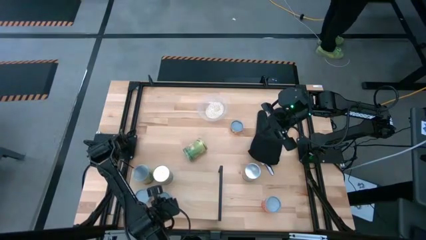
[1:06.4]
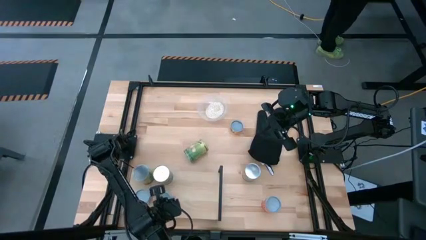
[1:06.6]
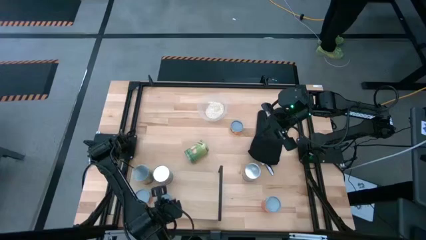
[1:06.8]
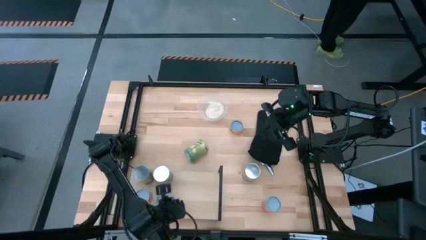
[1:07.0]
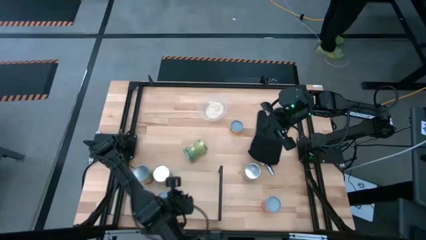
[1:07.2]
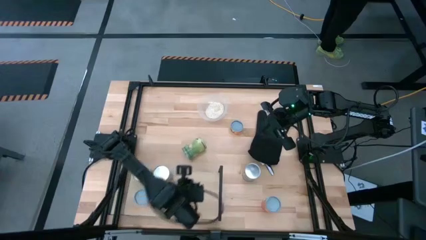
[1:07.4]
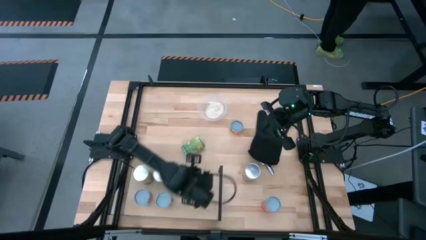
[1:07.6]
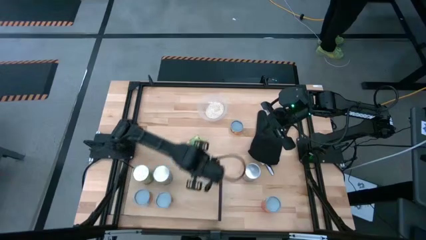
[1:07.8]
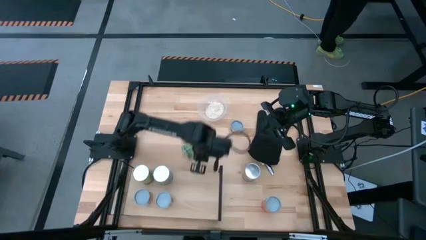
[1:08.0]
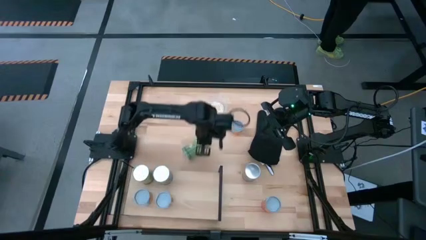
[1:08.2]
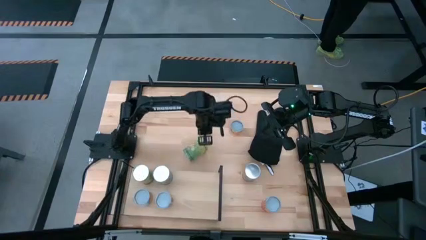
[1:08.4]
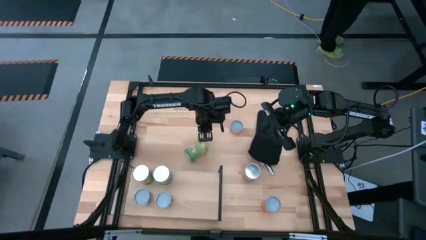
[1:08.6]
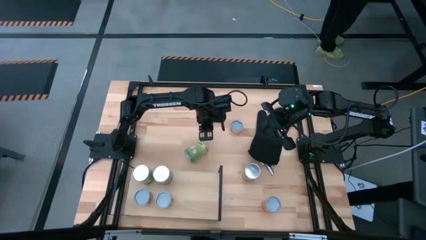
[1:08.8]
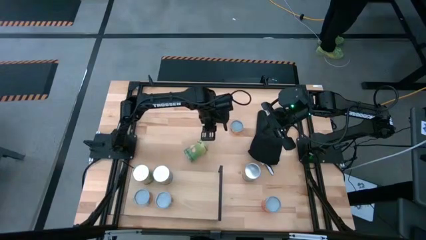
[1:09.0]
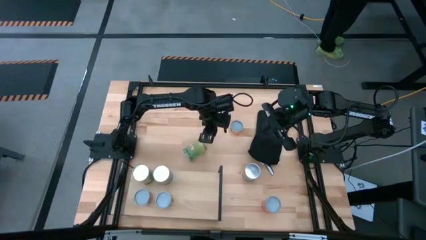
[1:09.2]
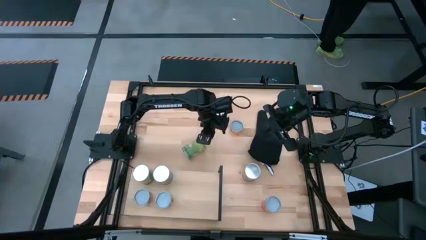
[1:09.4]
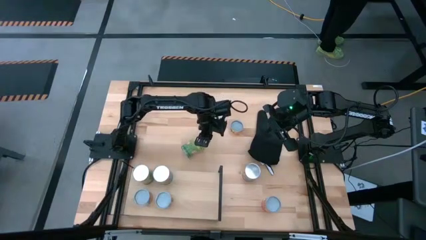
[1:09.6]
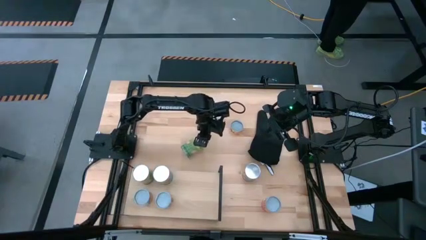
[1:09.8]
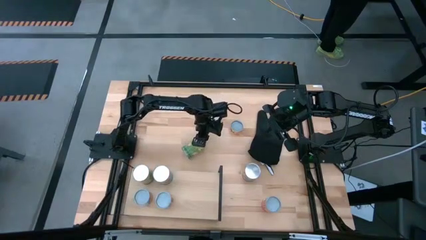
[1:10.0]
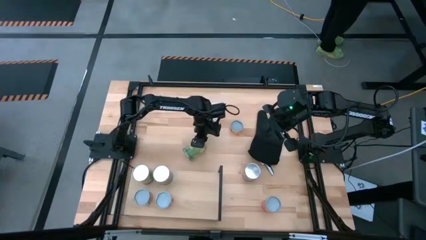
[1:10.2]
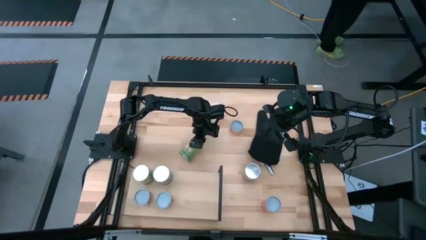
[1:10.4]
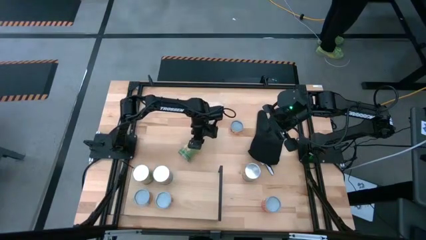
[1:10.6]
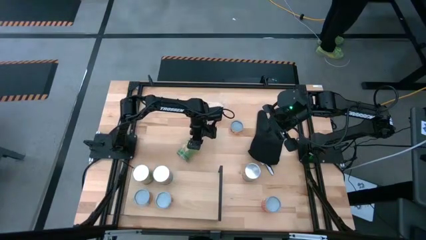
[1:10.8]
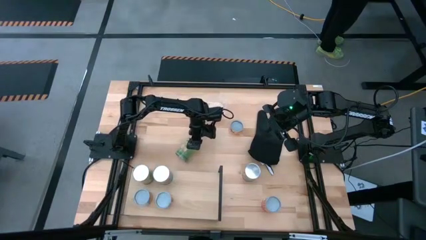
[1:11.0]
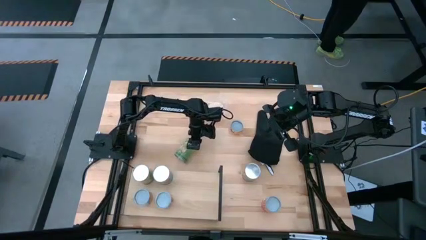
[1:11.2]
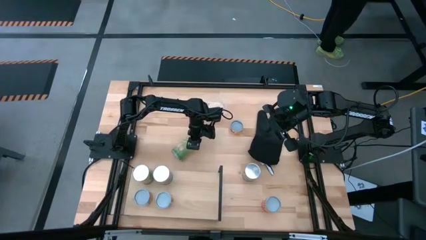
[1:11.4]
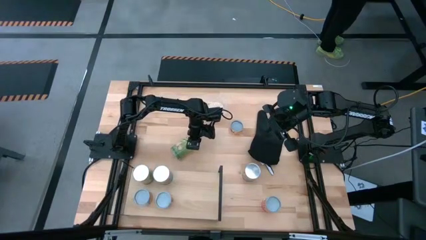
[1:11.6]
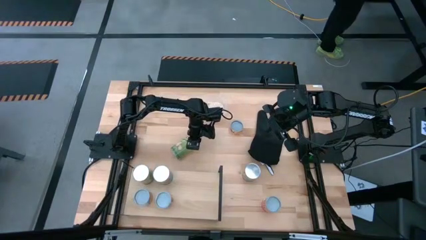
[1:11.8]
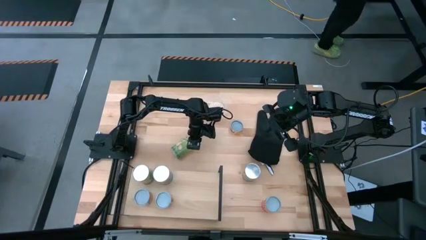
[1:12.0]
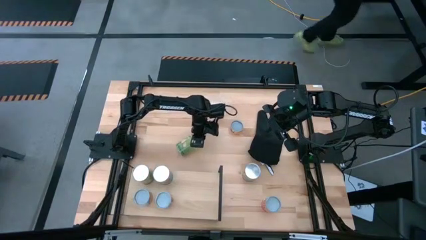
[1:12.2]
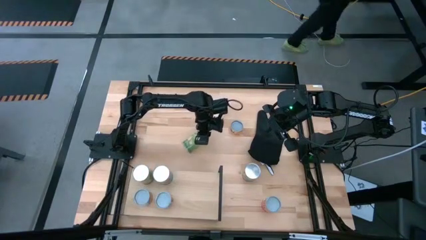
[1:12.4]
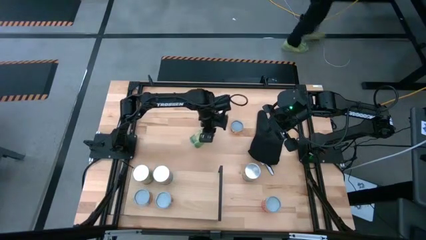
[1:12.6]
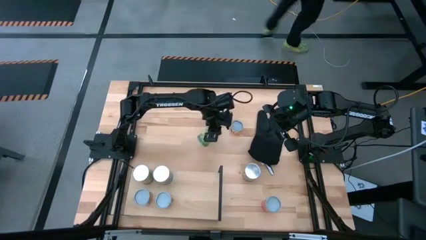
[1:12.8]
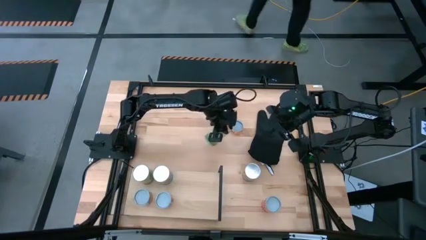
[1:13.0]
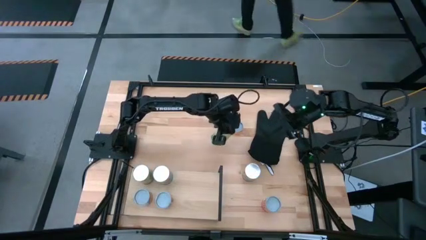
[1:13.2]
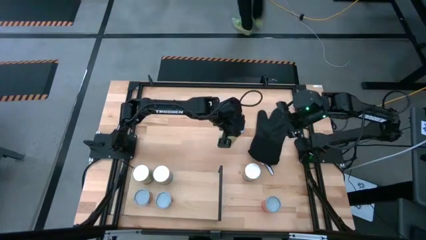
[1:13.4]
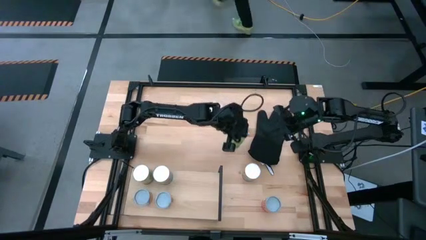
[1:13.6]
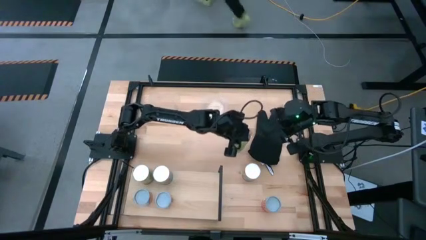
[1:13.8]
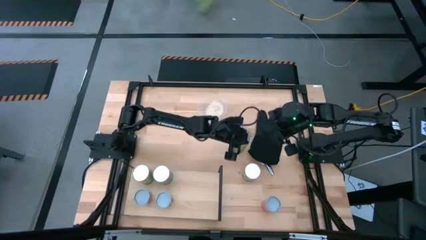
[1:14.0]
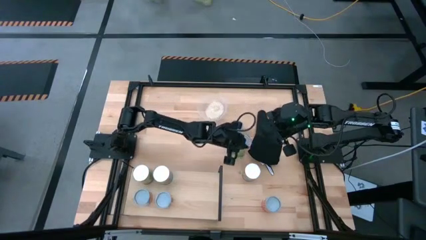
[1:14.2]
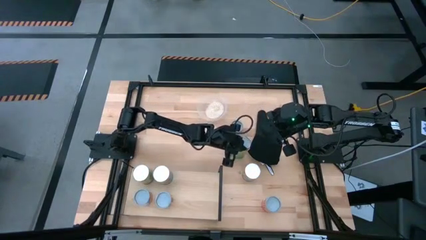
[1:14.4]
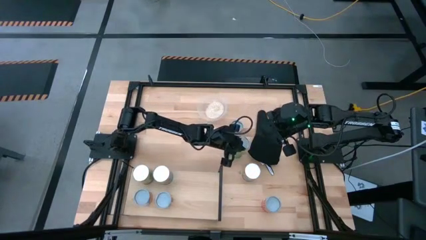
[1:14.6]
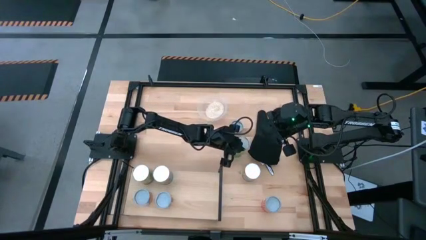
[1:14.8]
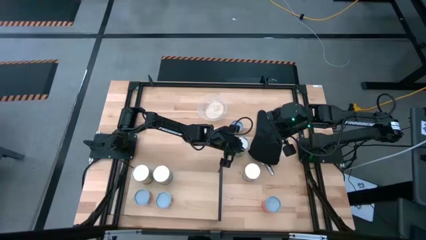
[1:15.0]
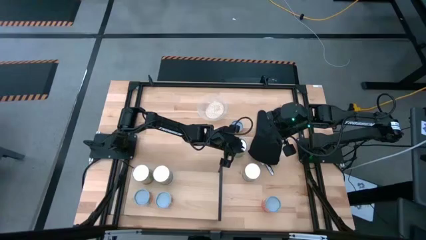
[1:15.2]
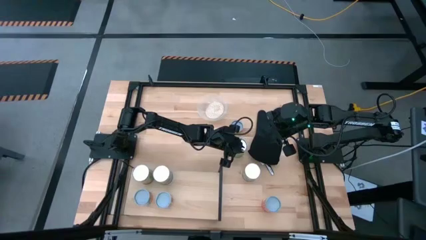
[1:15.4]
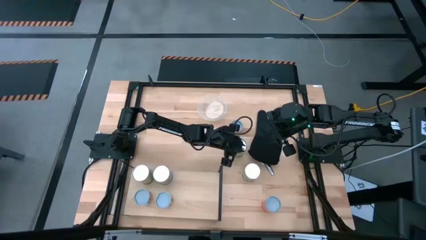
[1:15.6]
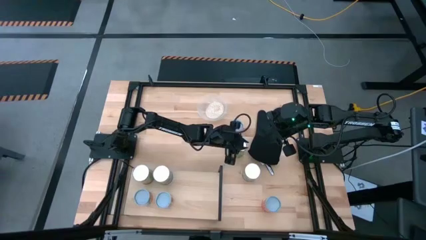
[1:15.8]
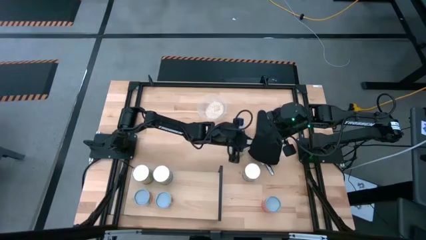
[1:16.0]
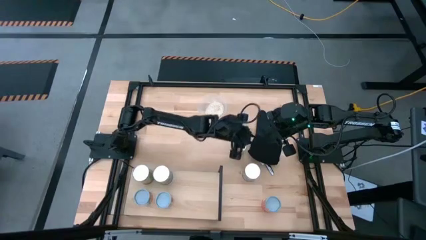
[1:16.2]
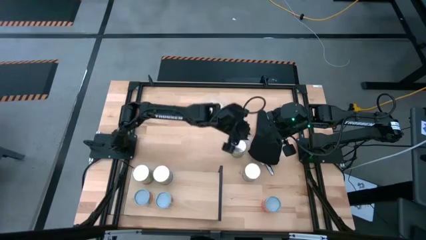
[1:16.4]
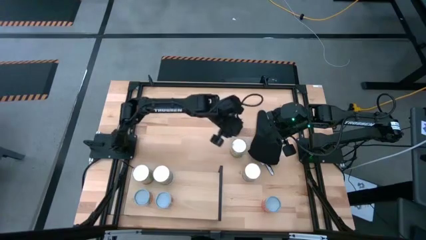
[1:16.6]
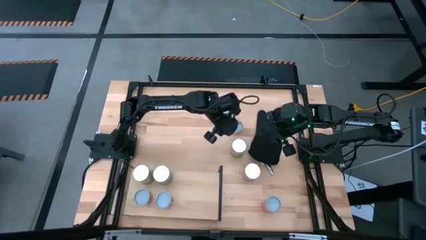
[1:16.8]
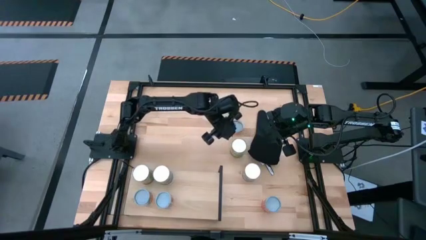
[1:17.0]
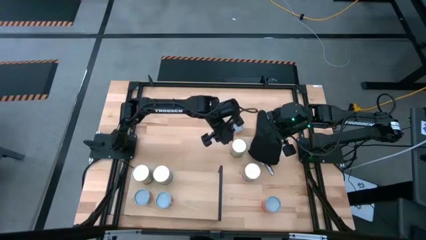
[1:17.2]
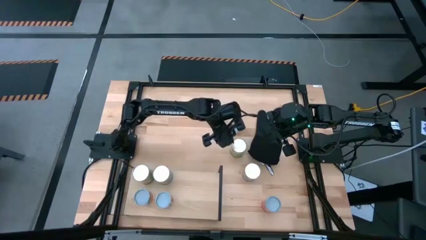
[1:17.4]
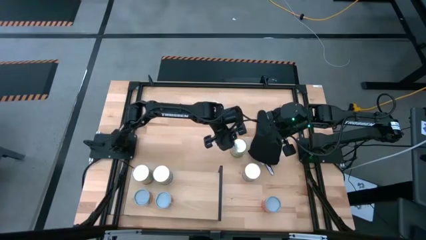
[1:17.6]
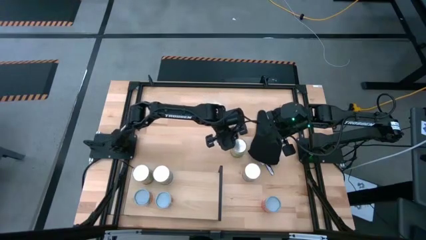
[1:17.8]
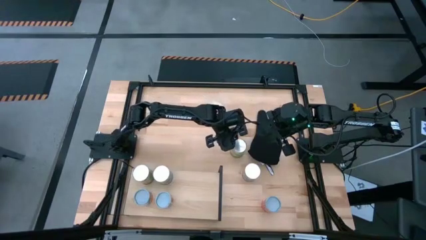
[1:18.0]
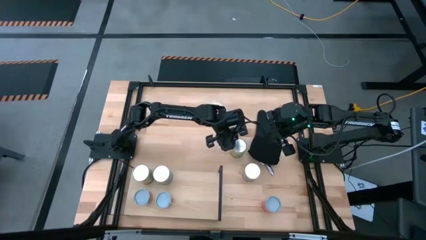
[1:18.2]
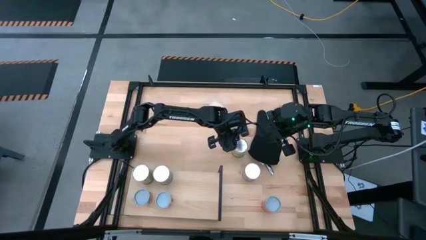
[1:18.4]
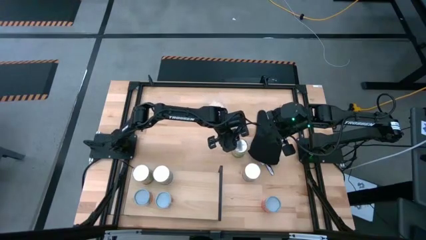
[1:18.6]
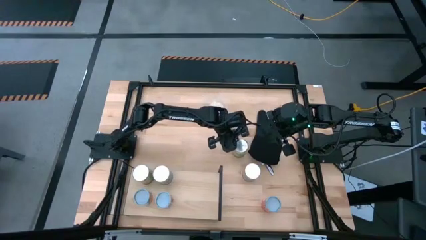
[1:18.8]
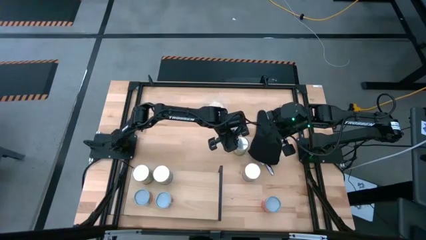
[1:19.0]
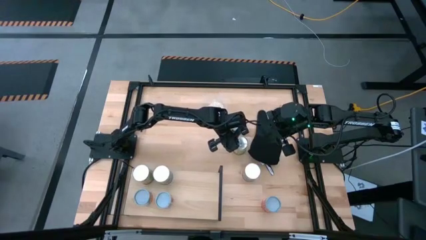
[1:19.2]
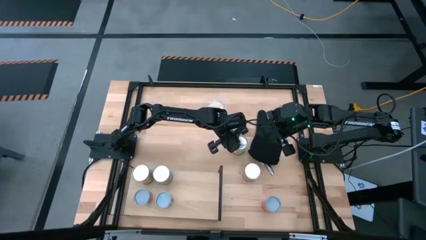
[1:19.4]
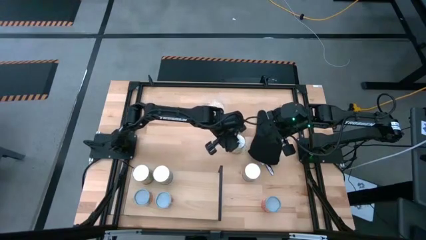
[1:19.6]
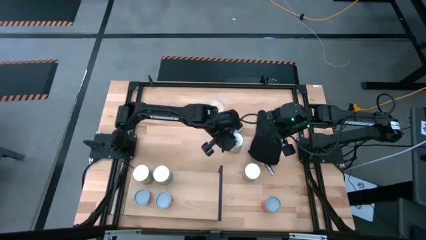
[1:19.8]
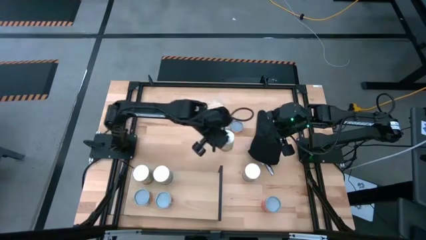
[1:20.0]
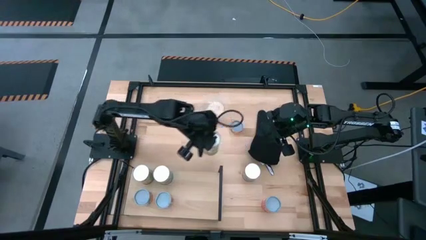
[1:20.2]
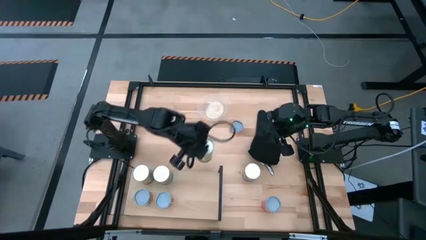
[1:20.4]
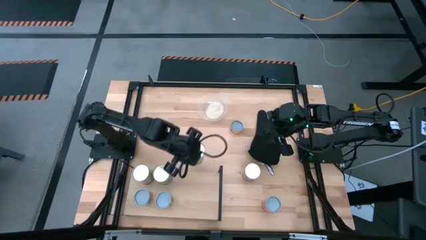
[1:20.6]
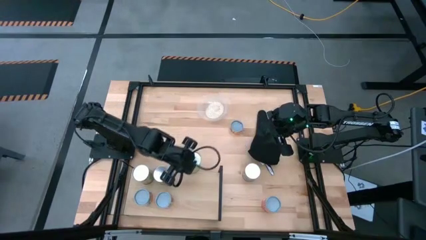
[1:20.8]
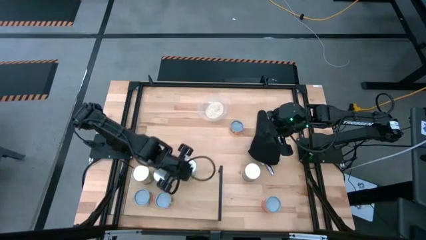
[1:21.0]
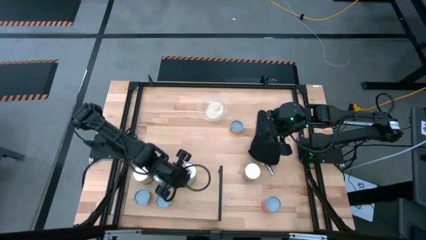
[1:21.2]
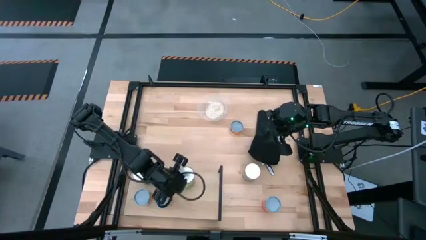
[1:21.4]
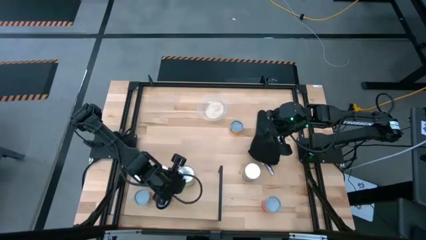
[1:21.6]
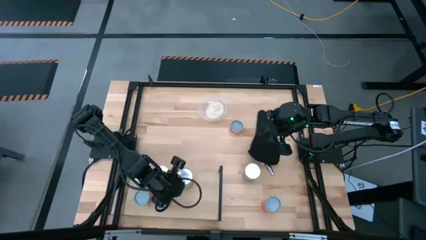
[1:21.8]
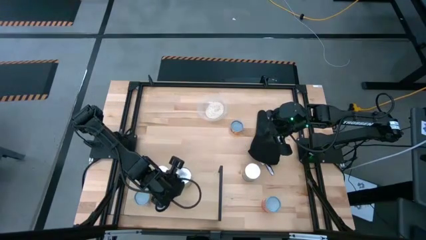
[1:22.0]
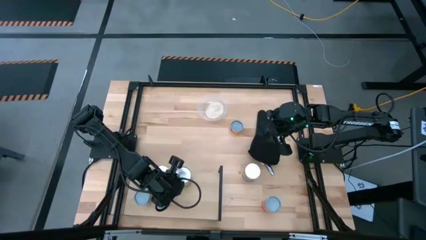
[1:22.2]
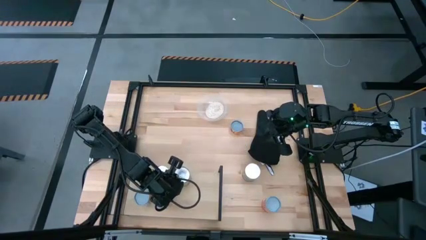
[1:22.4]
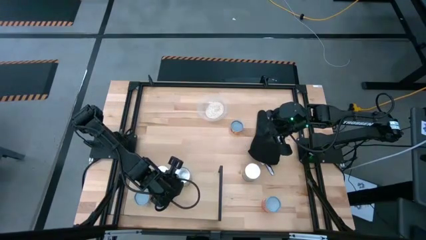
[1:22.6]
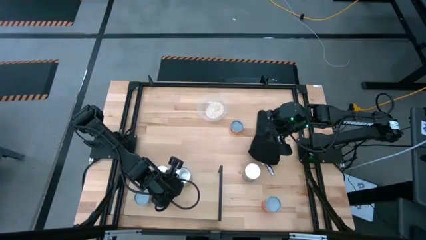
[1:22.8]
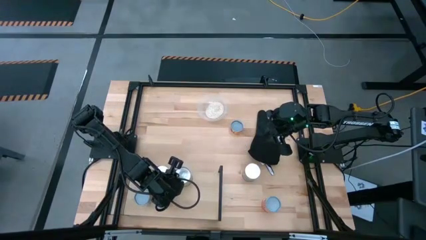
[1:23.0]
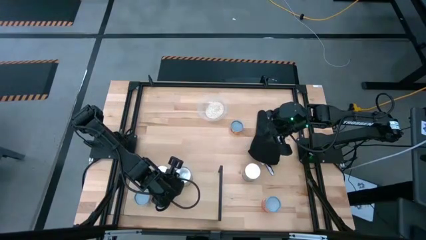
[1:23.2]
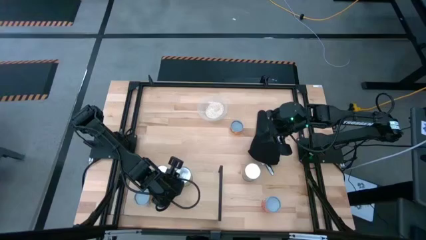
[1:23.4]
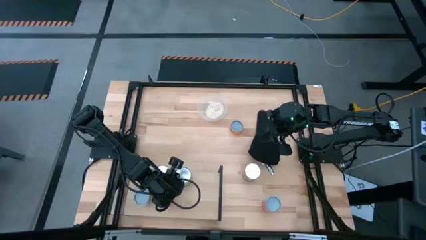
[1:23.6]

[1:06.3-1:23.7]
Task: Pick and place cans onto a shelf
Put the green canned pear on the shelf
